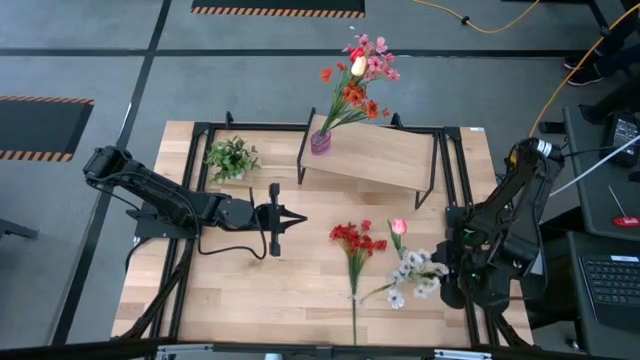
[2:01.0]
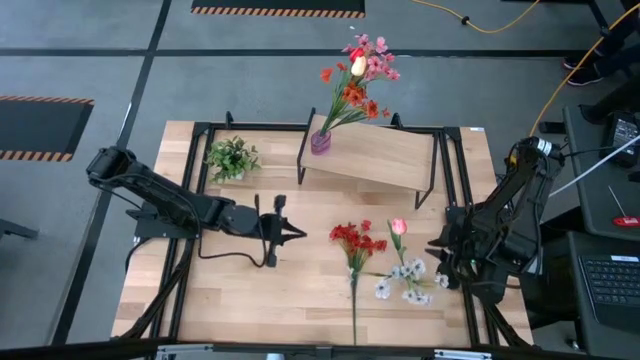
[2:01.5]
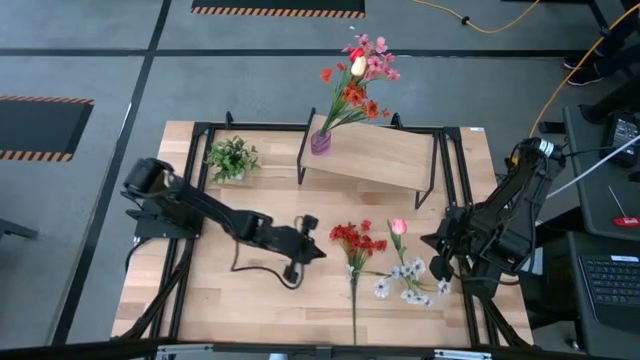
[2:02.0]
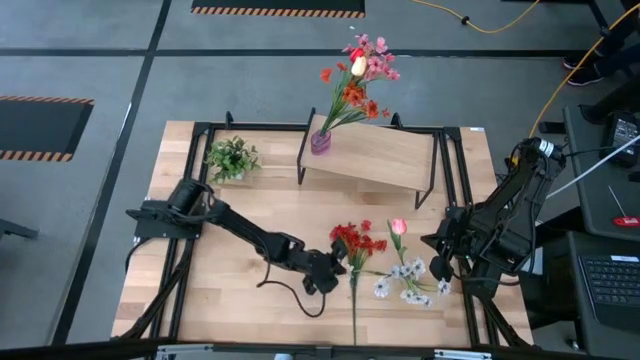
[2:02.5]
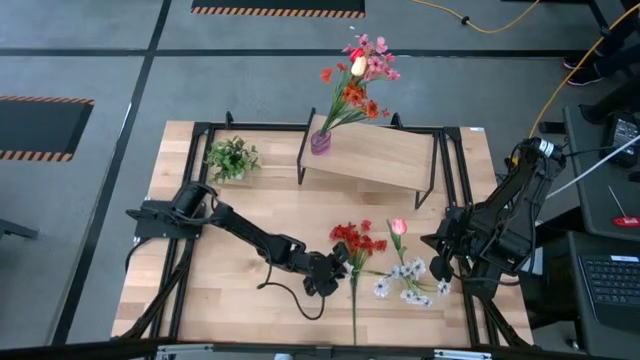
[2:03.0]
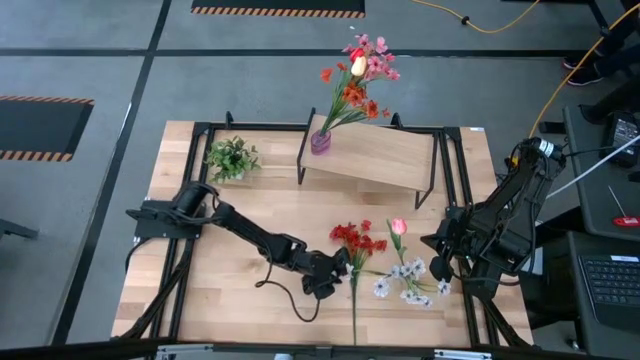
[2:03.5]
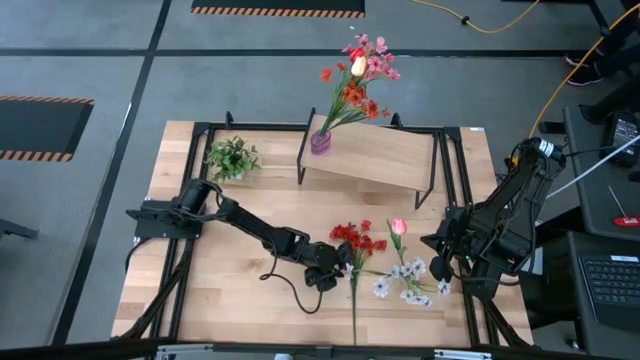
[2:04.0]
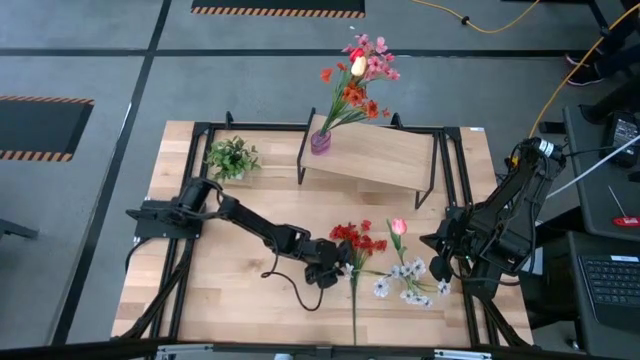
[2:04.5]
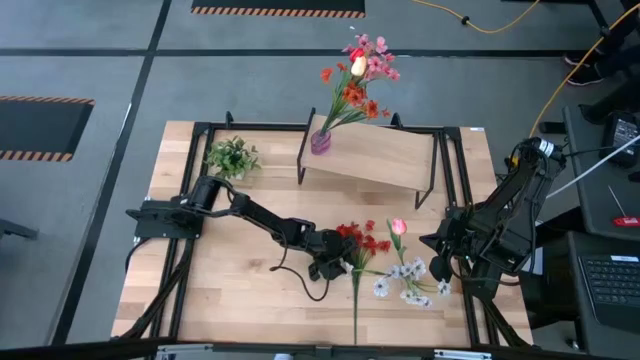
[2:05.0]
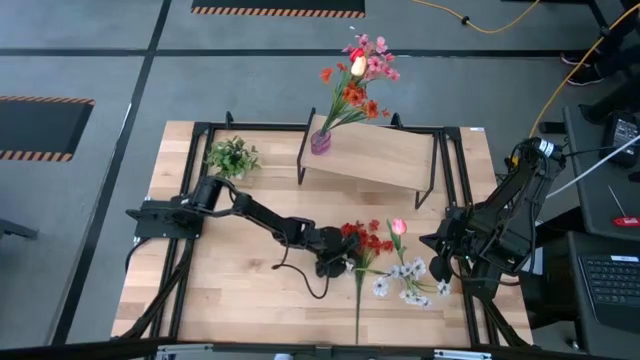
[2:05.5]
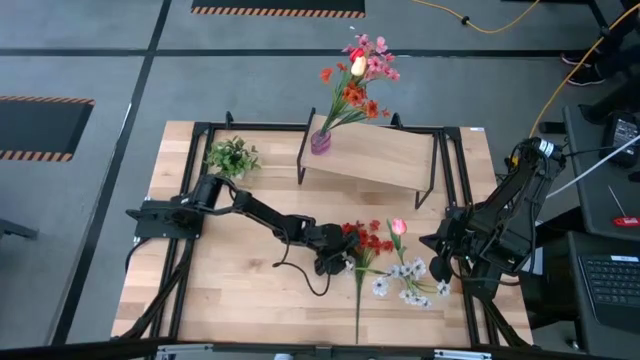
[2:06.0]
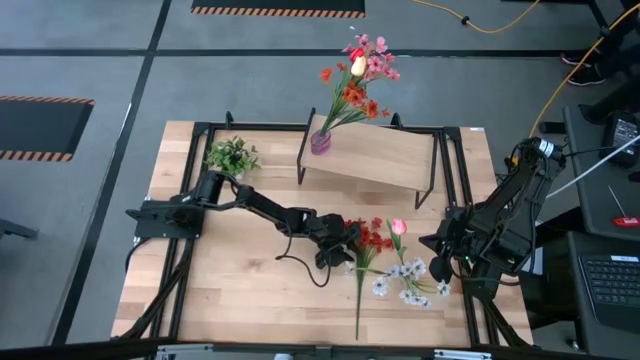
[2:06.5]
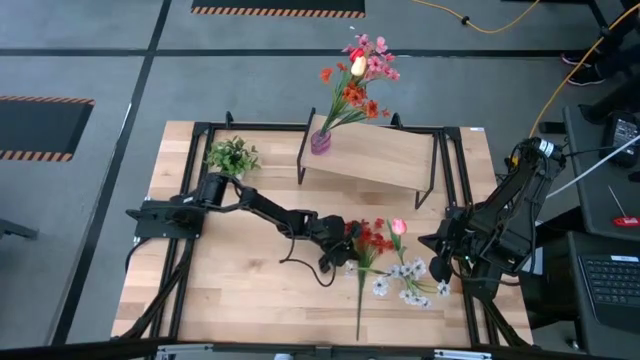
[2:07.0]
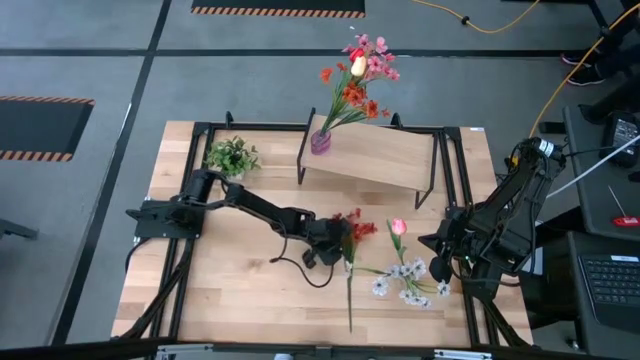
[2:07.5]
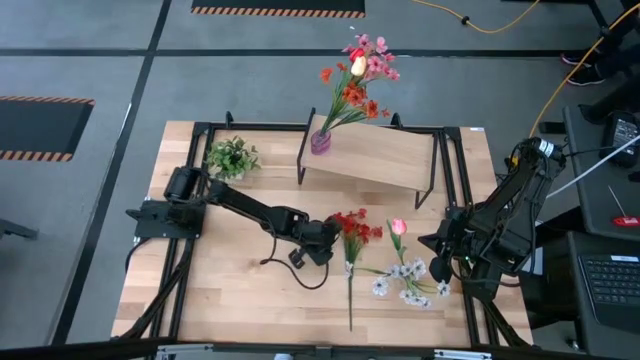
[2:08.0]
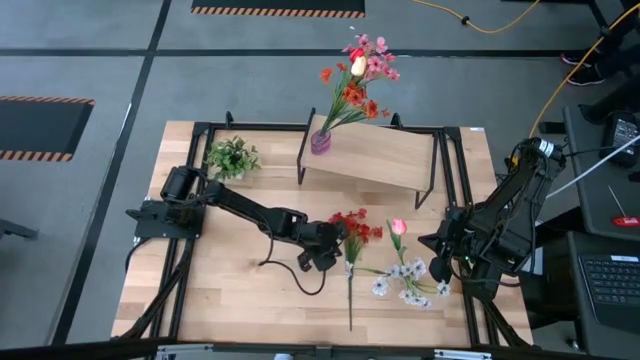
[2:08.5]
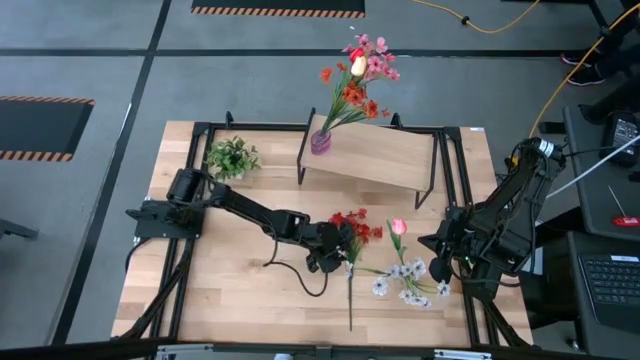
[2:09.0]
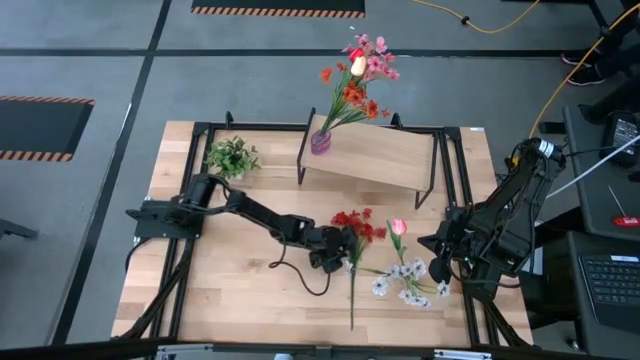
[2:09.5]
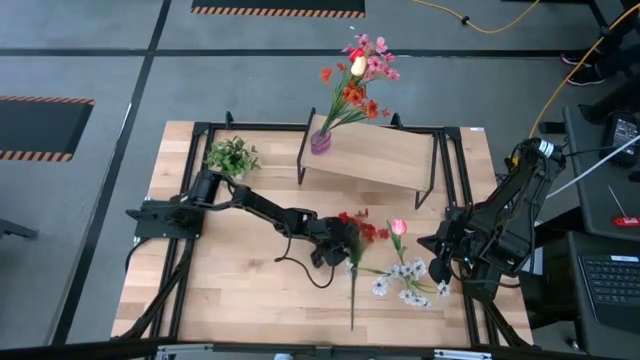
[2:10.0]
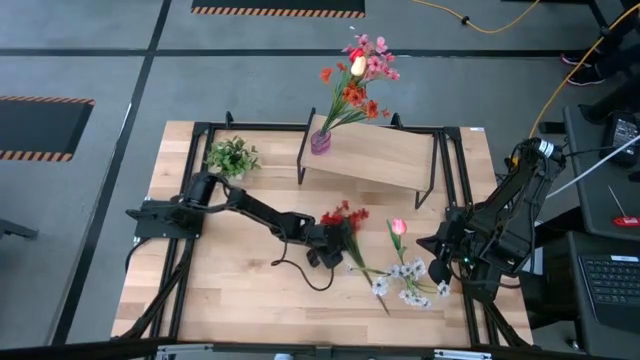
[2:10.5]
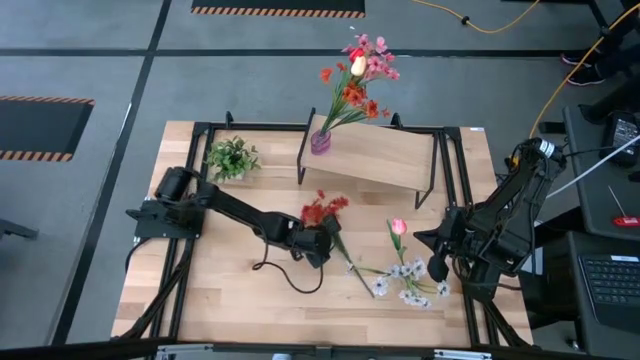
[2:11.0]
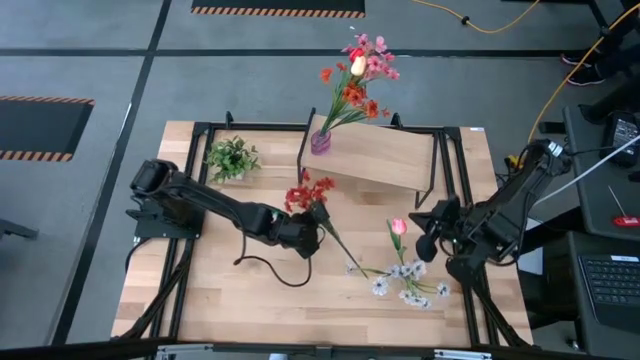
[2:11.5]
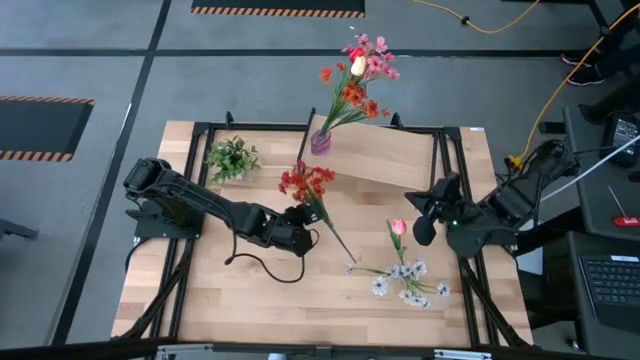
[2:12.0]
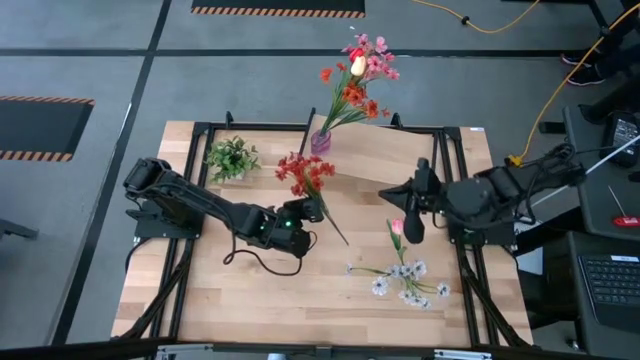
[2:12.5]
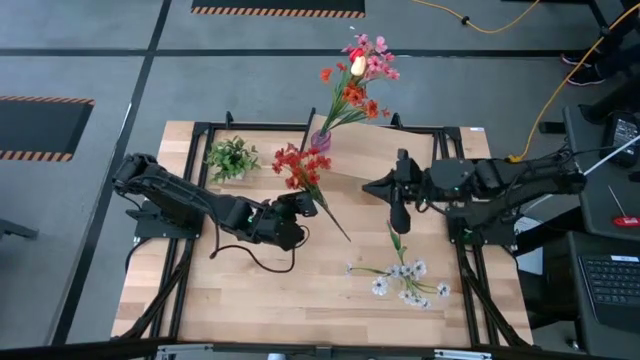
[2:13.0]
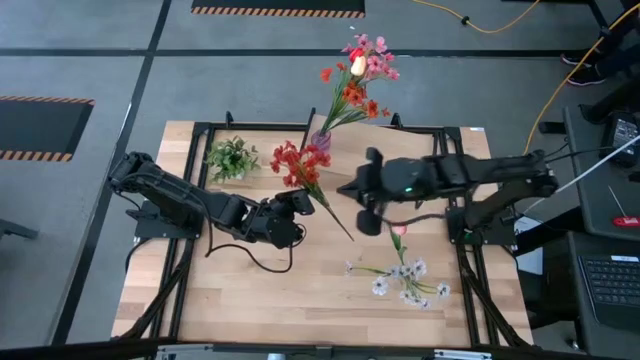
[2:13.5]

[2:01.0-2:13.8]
Task: Pick and place flowers into a vace then onto a shelf
Put the orange flowers into the transparent vase
